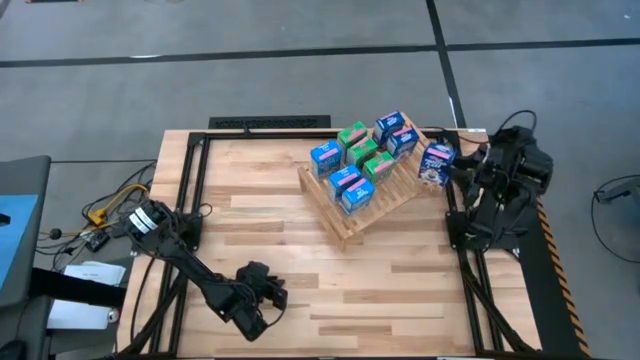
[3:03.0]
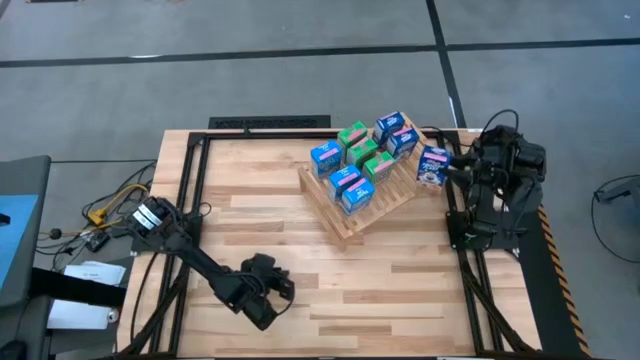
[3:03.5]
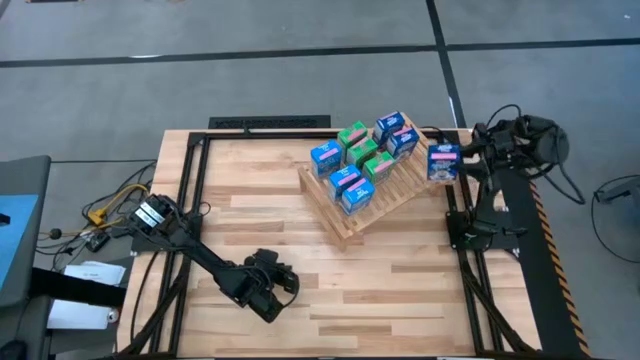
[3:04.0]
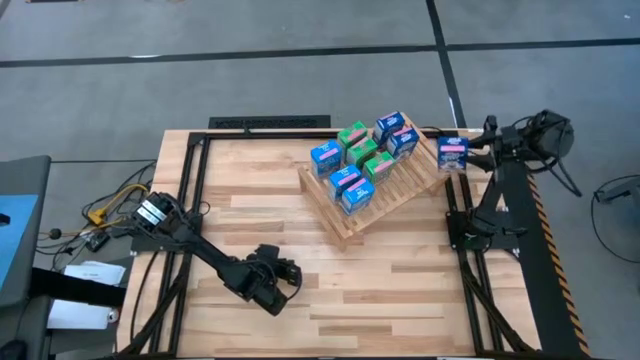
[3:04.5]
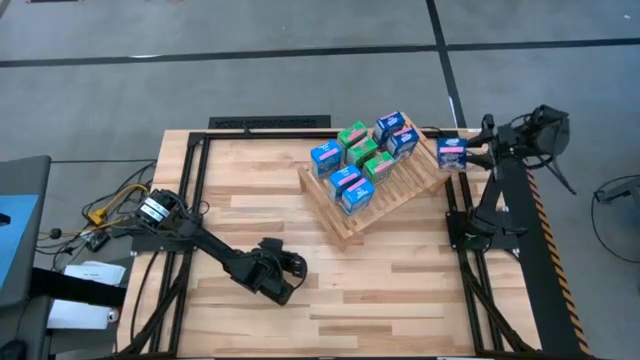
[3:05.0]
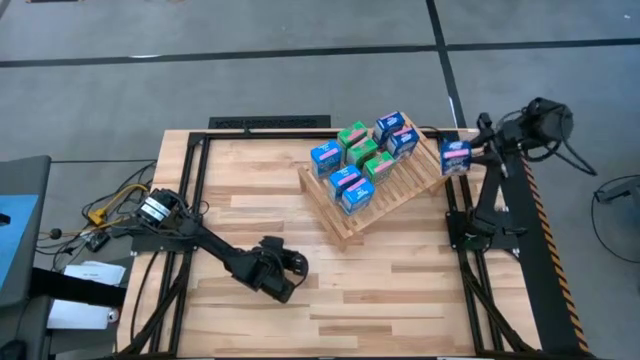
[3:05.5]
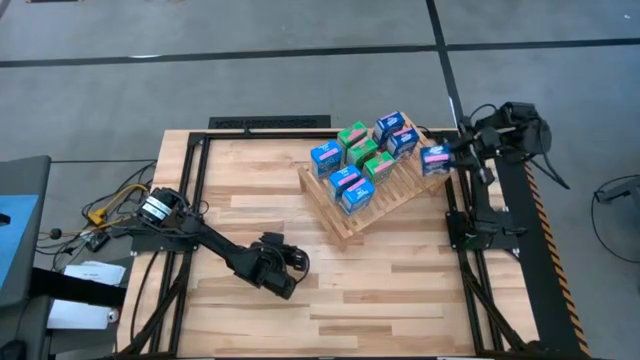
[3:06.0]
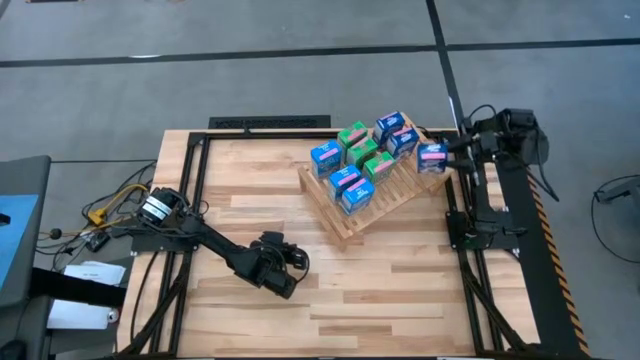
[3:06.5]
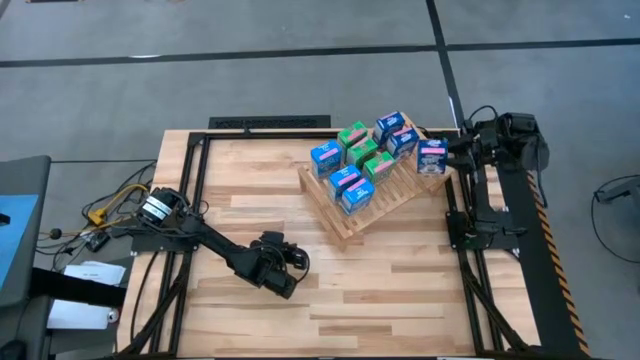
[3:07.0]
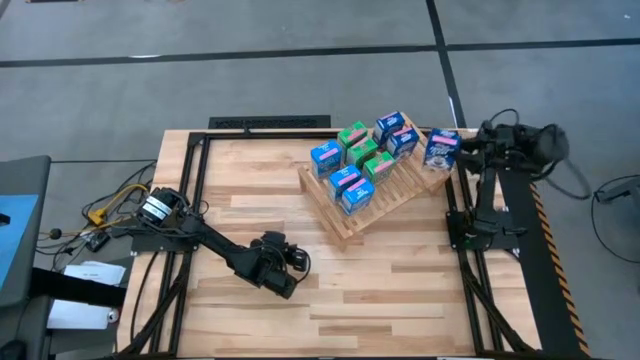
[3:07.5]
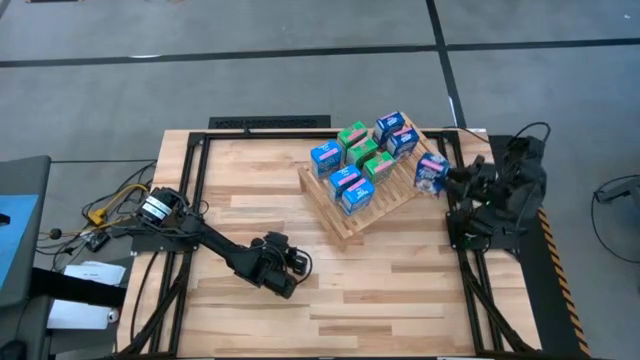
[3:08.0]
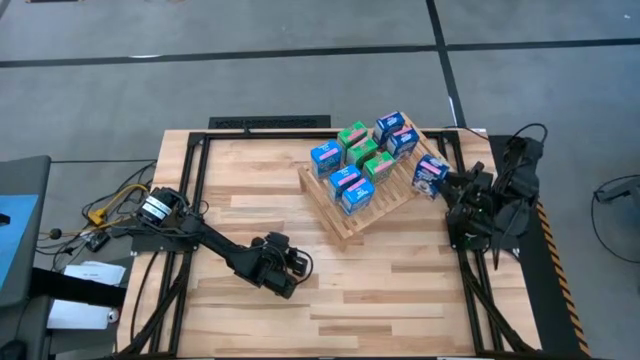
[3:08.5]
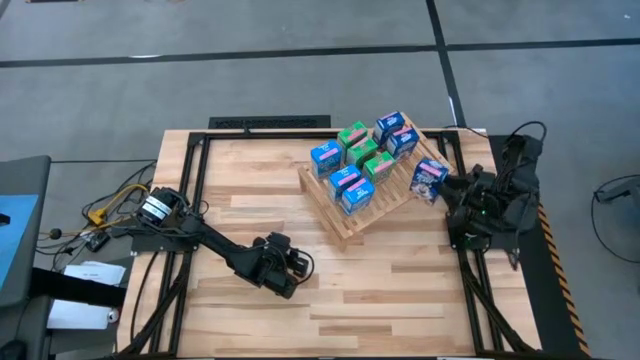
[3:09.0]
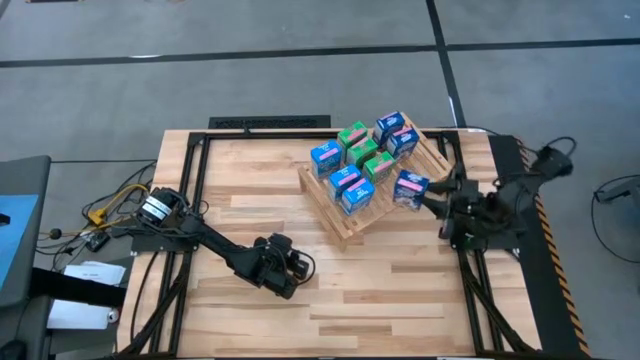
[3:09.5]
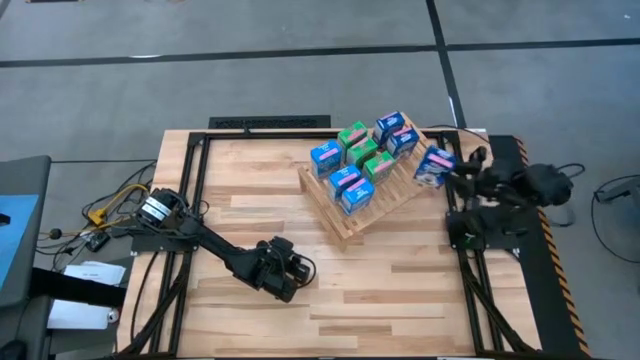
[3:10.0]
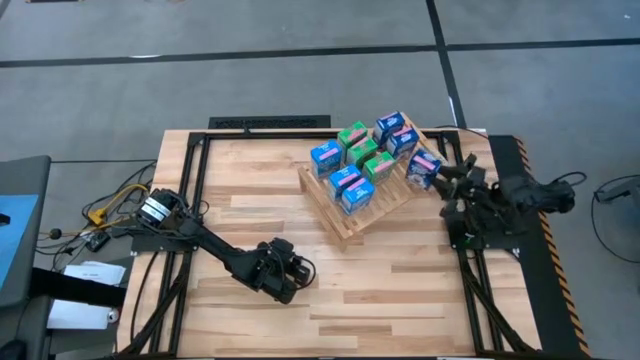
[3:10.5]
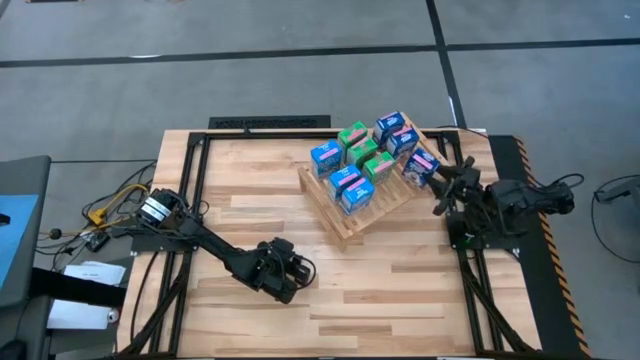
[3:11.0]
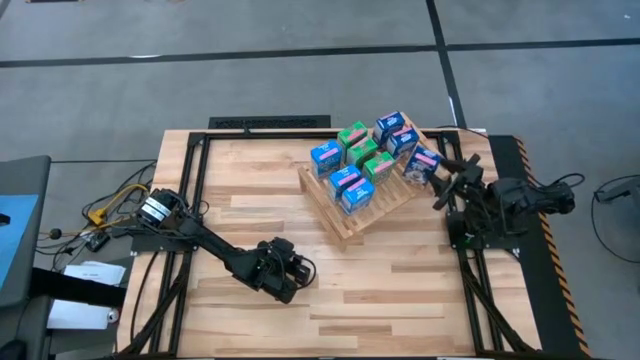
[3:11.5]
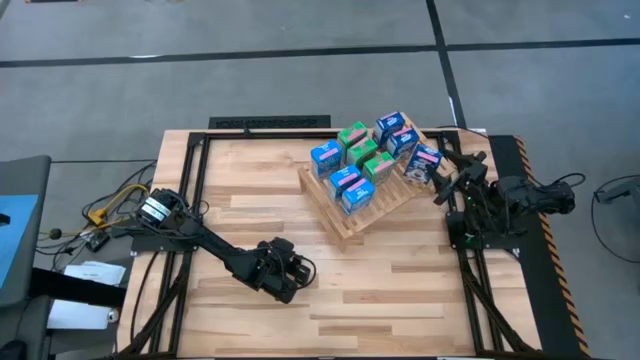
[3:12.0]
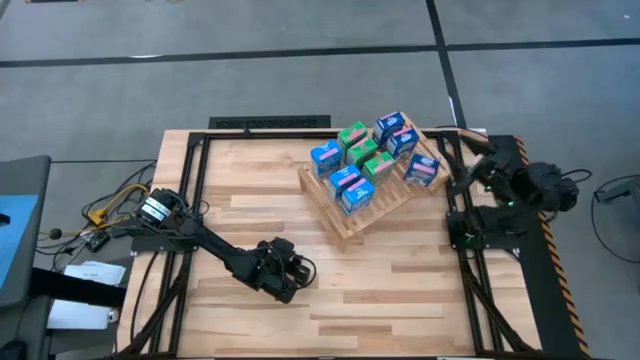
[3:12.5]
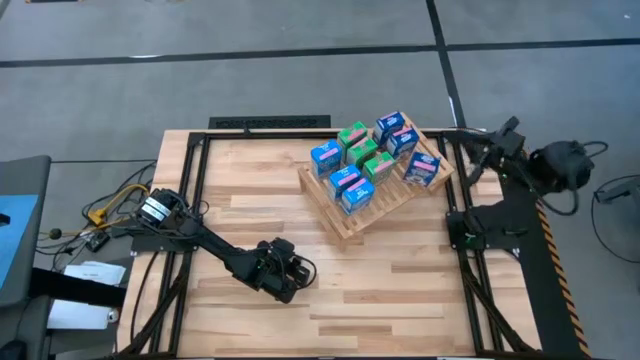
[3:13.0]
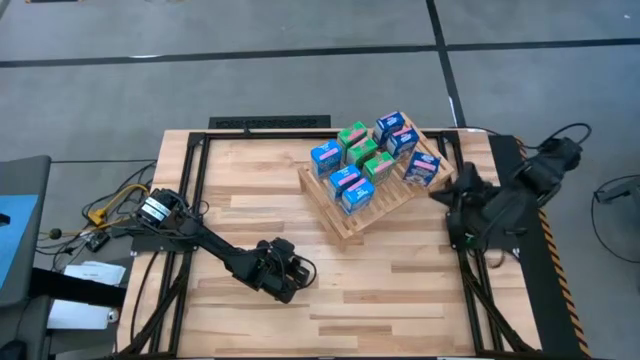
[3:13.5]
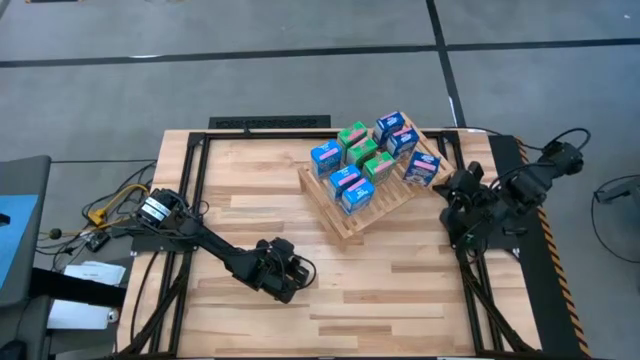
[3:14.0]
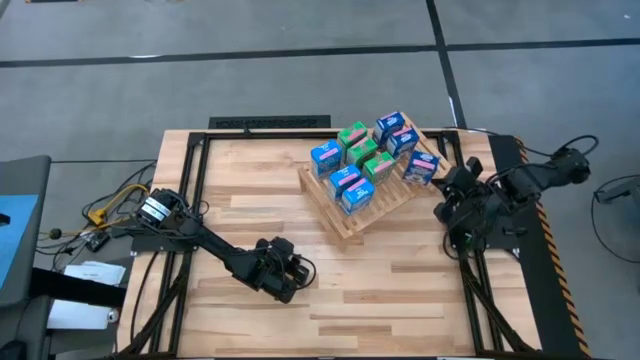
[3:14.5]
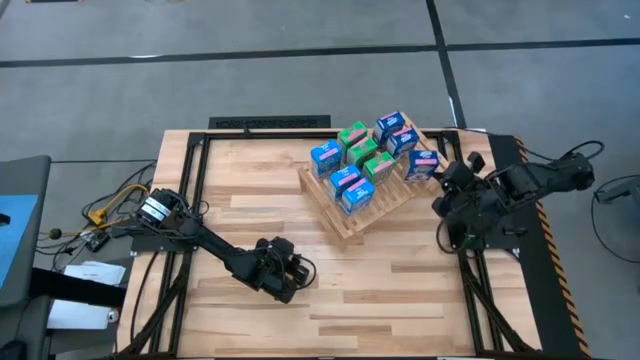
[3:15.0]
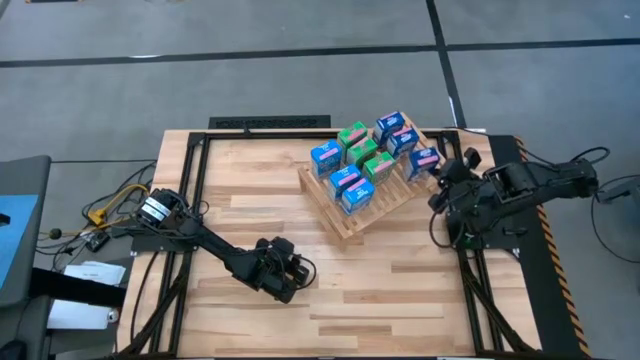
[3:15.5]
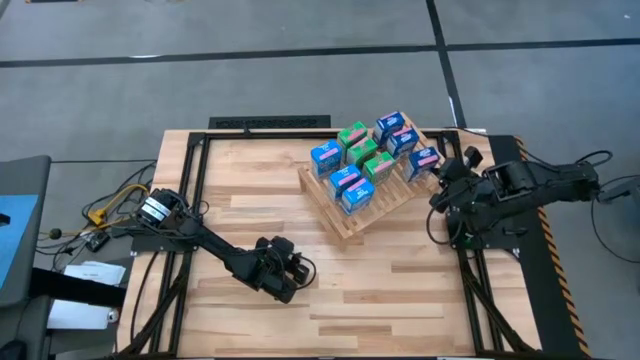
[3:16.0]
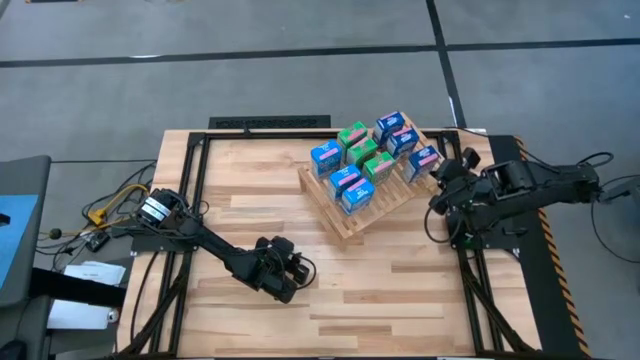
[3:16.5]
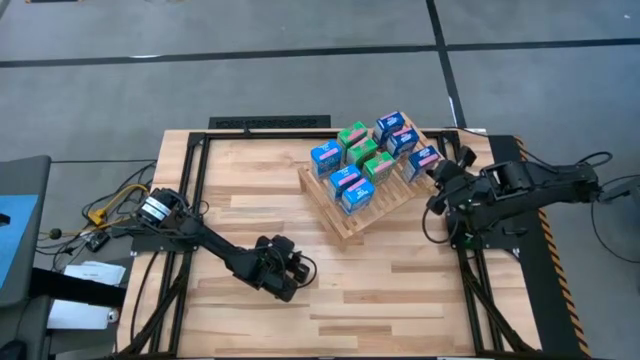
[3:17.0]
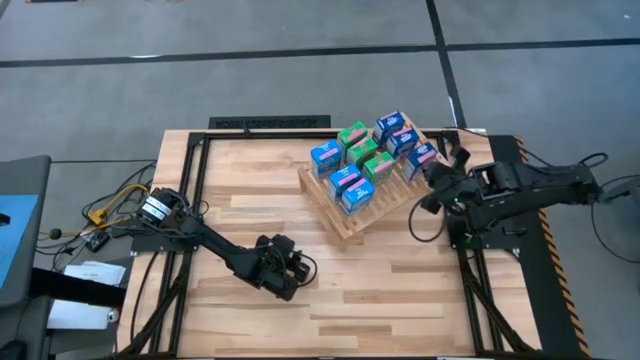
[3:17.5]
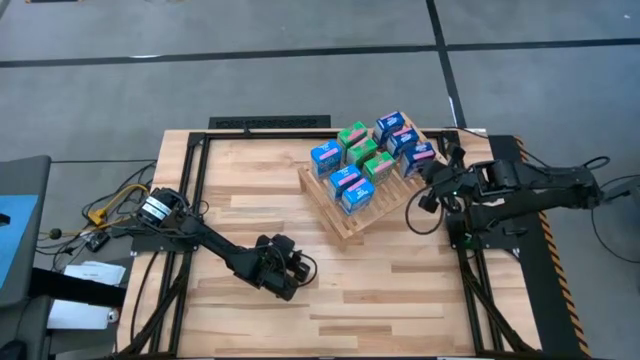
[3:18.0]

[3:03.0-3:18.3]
Task: Stack cereal on shelf
Put the blue cereal aligned with the other blue cereal boxes on the shelf

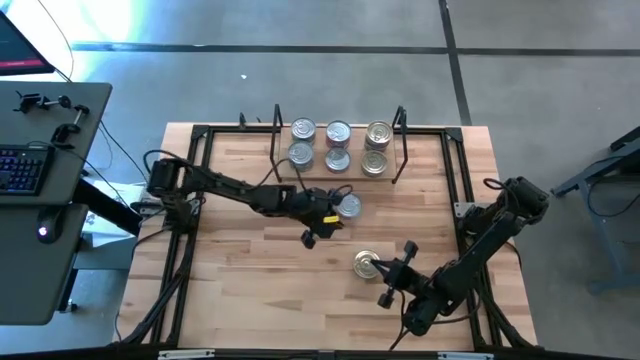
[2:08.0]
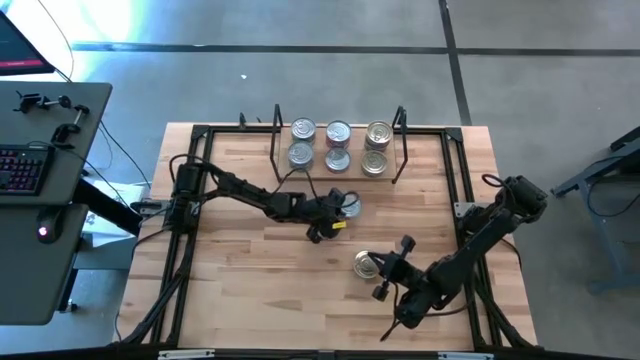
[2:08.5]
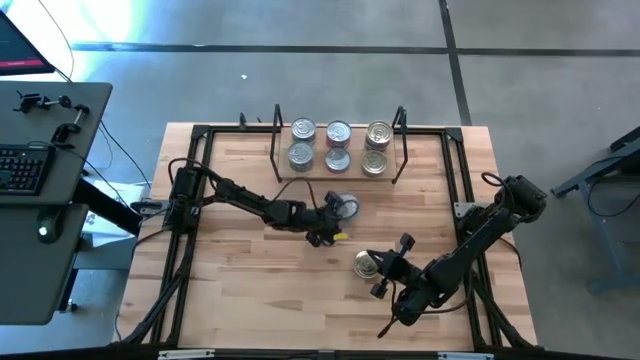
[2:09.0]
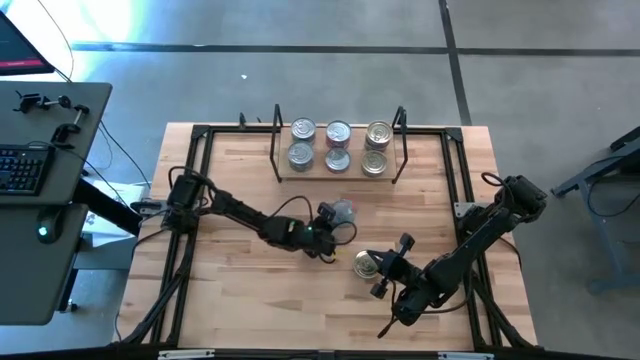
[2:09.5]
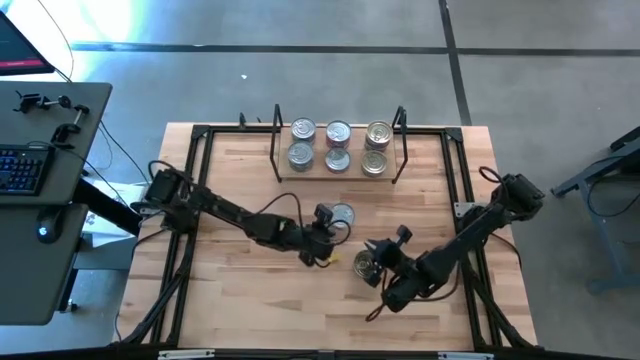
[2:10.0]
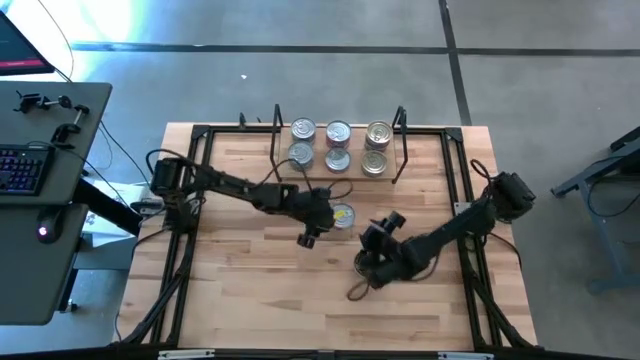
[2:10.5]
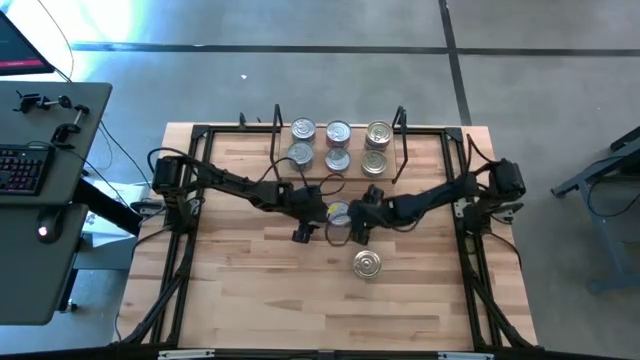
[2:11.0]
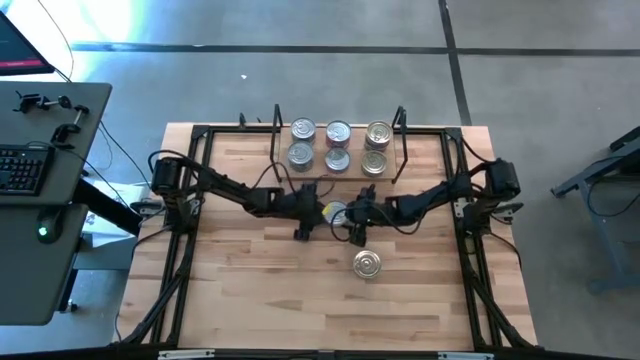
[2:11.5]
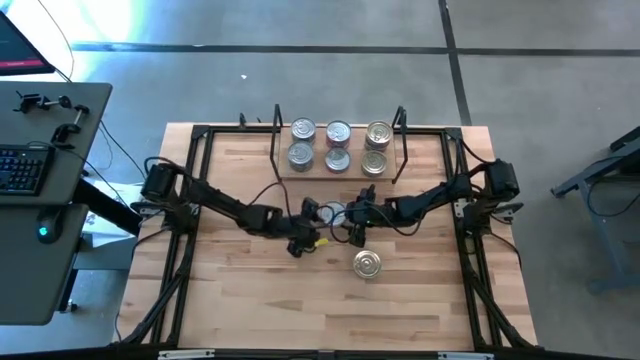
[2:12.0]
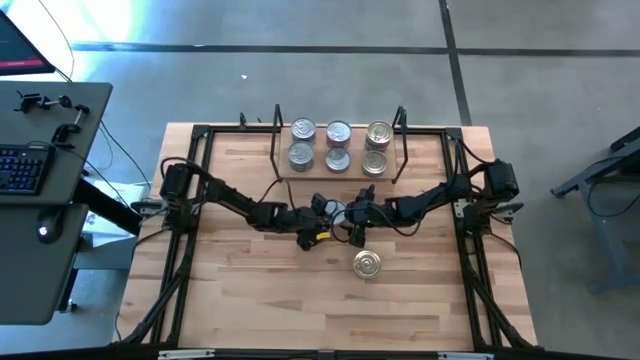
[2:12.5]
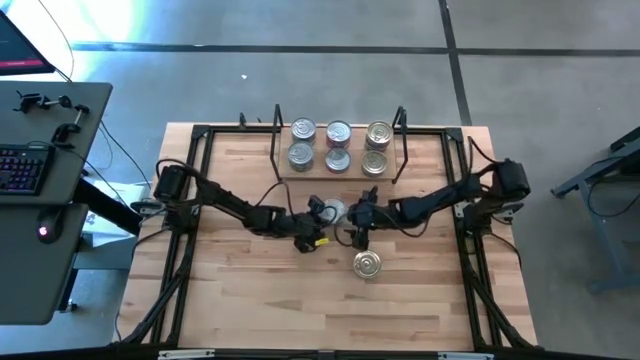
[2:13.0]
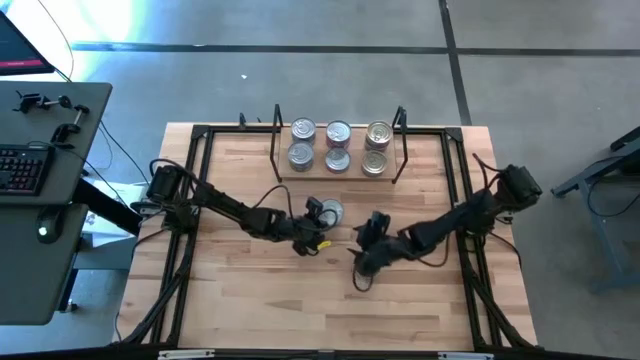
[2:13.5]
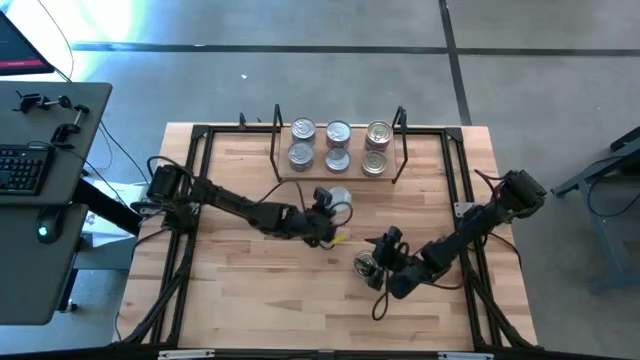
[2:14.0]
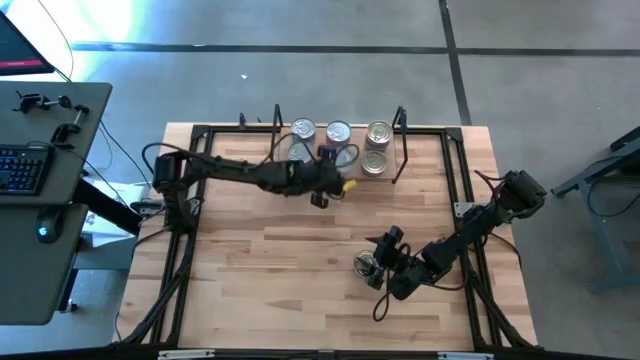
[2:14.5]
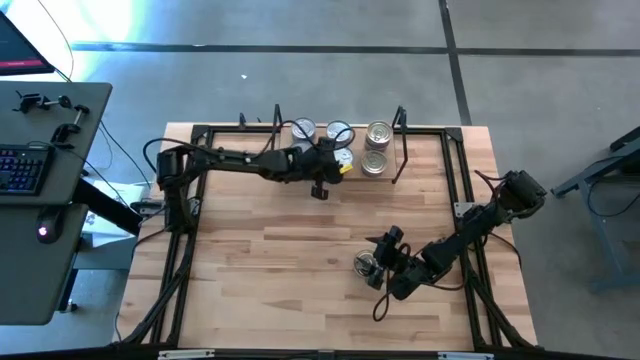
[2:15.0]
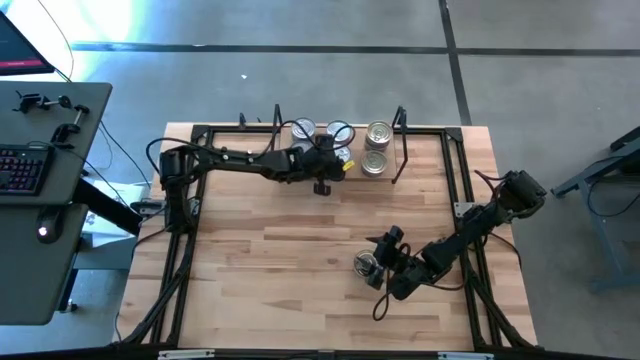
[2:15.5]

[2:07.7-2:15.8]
Task: Stack canned seafood by type on shelf
Stack the red tuna can on top of the other red tuna can on the shelf
